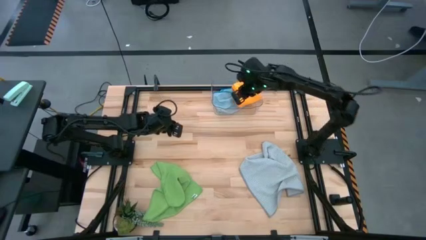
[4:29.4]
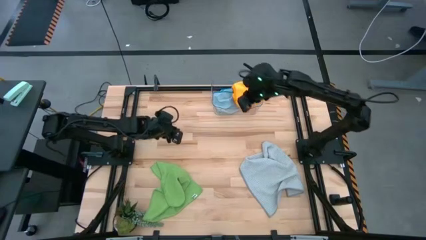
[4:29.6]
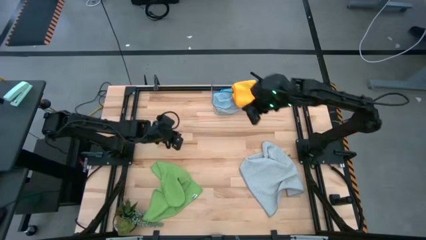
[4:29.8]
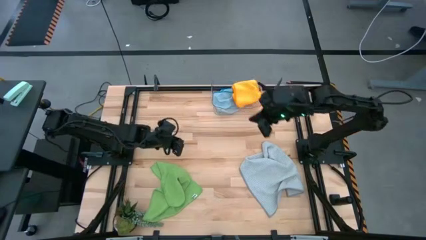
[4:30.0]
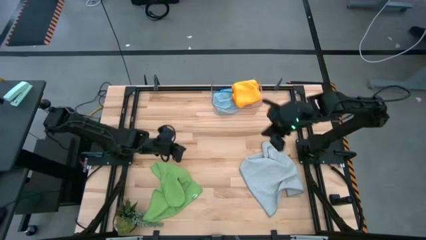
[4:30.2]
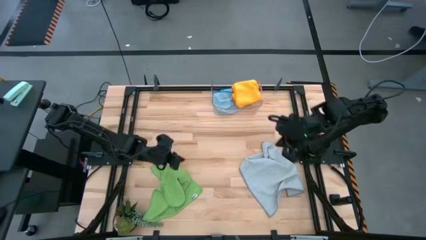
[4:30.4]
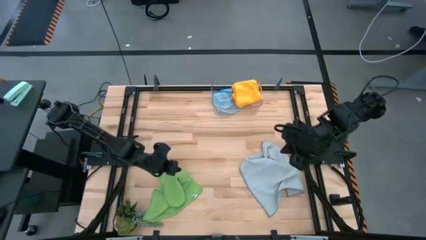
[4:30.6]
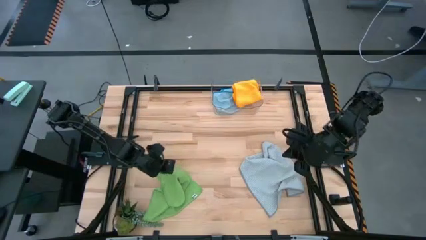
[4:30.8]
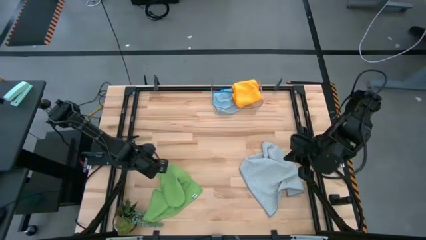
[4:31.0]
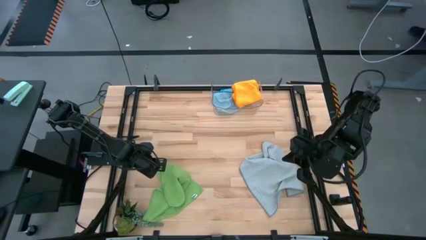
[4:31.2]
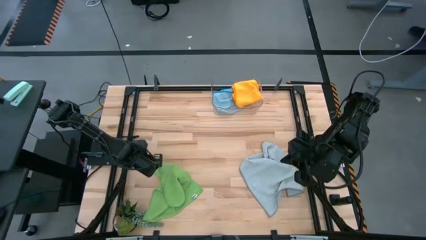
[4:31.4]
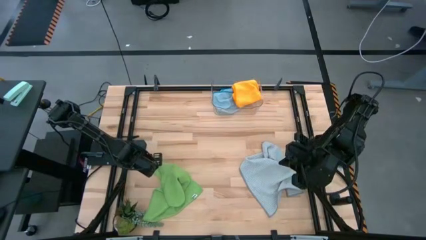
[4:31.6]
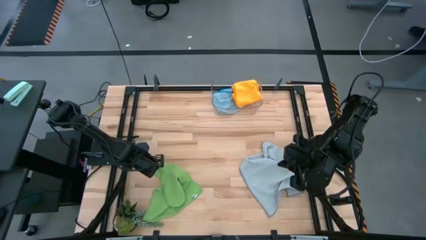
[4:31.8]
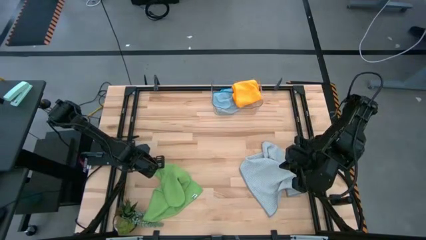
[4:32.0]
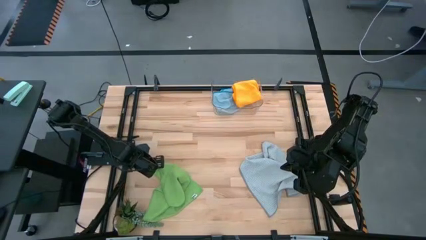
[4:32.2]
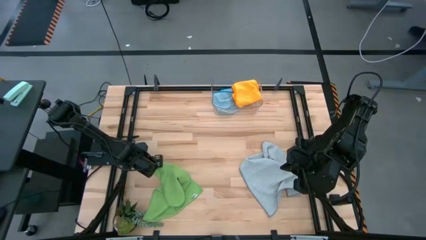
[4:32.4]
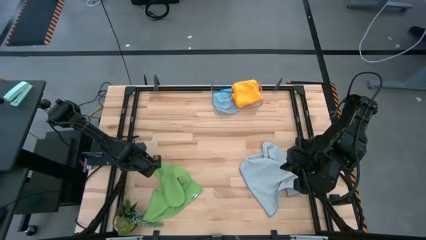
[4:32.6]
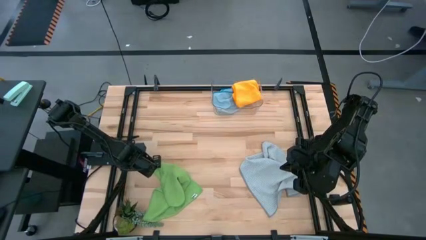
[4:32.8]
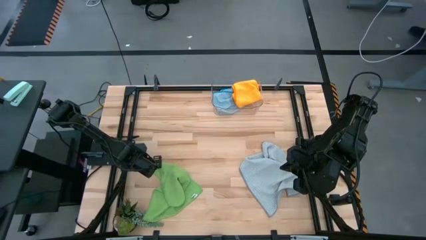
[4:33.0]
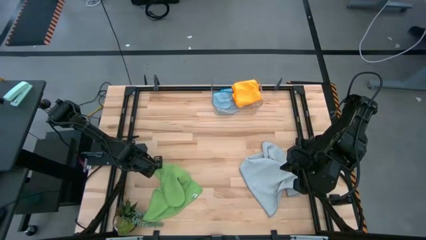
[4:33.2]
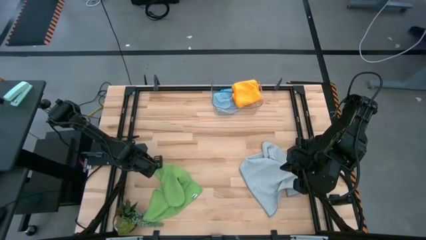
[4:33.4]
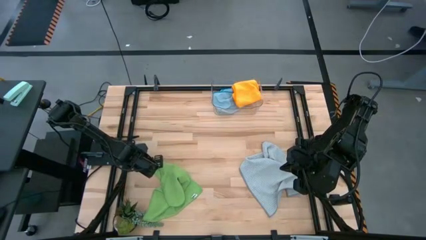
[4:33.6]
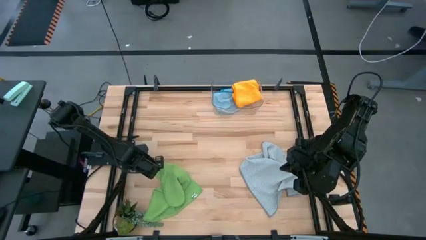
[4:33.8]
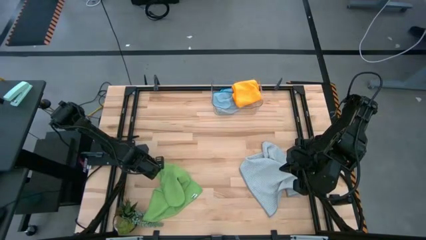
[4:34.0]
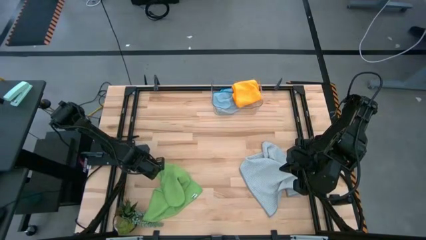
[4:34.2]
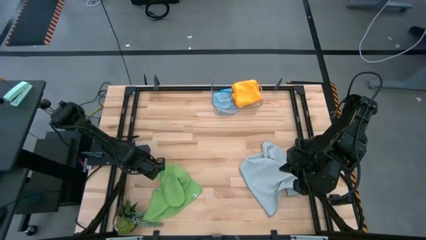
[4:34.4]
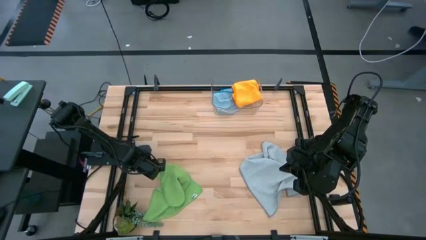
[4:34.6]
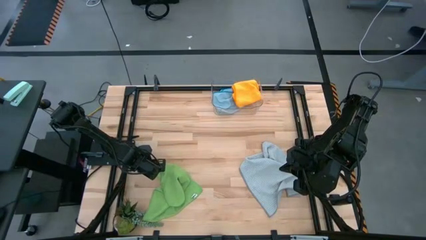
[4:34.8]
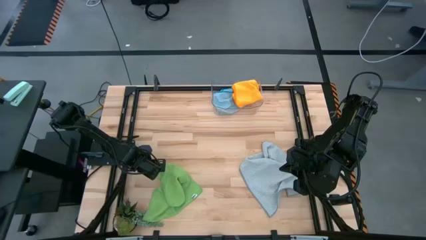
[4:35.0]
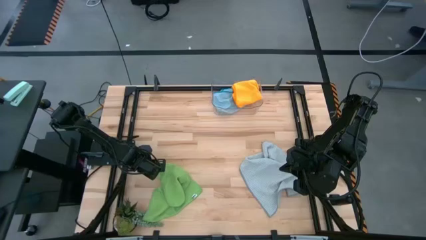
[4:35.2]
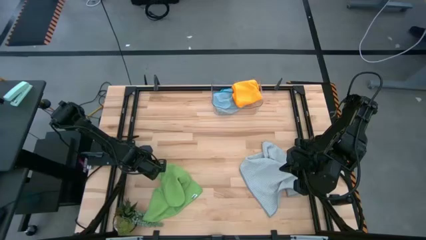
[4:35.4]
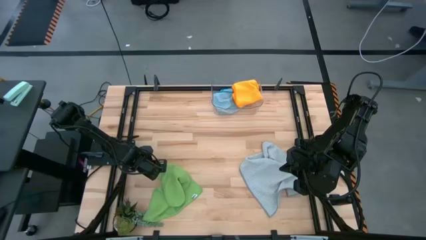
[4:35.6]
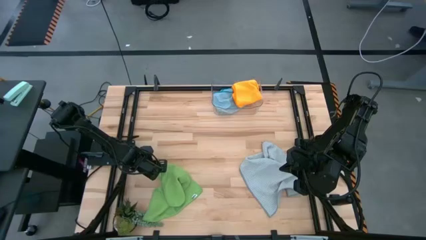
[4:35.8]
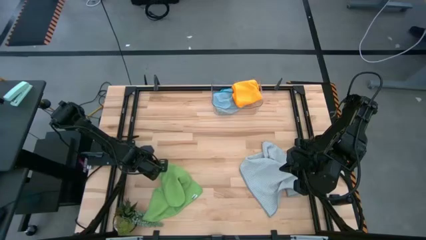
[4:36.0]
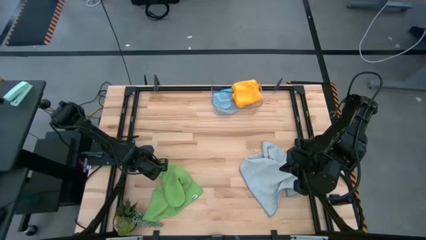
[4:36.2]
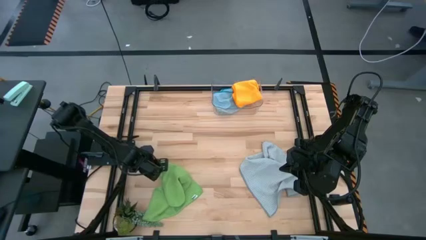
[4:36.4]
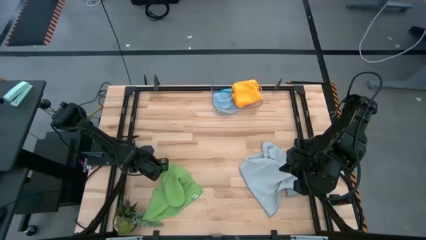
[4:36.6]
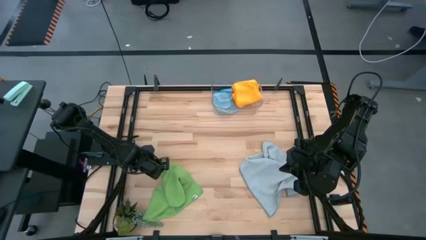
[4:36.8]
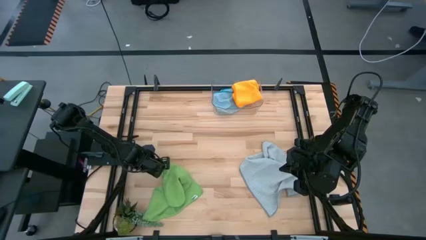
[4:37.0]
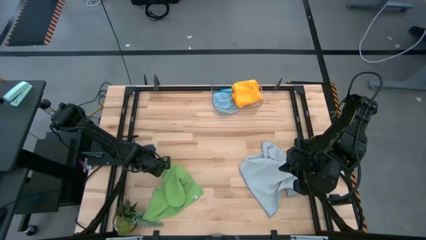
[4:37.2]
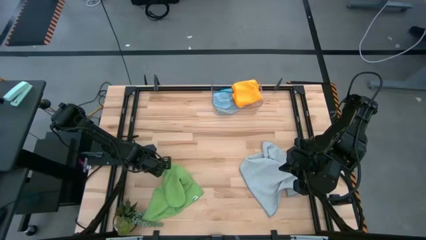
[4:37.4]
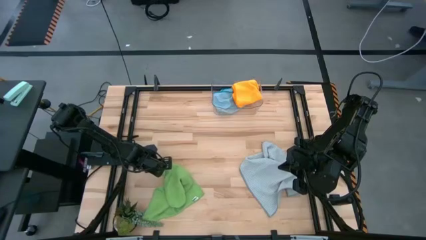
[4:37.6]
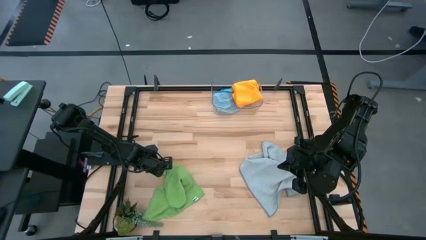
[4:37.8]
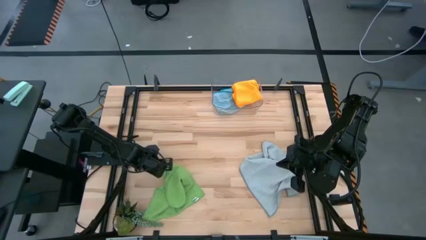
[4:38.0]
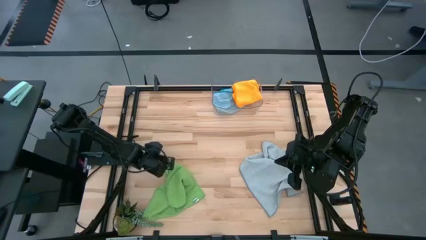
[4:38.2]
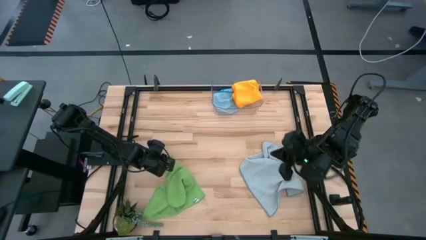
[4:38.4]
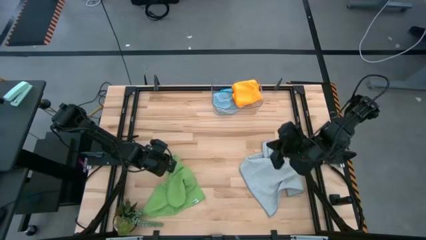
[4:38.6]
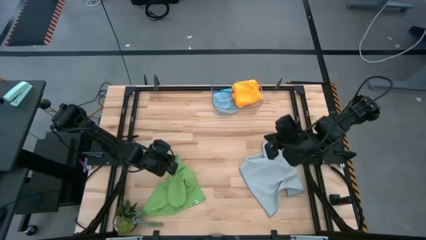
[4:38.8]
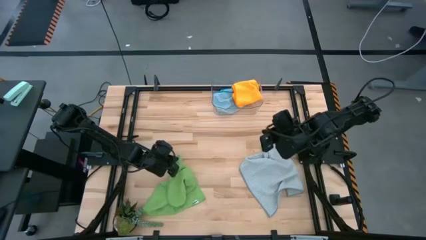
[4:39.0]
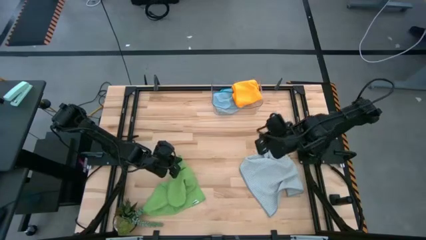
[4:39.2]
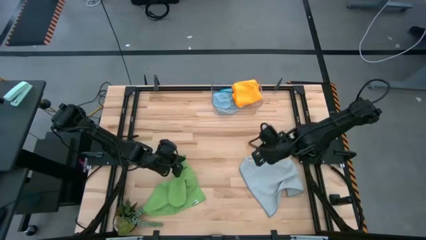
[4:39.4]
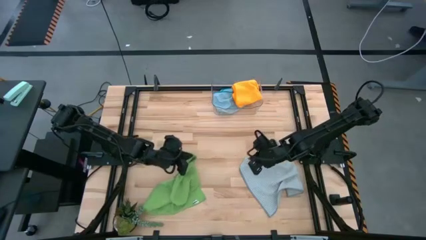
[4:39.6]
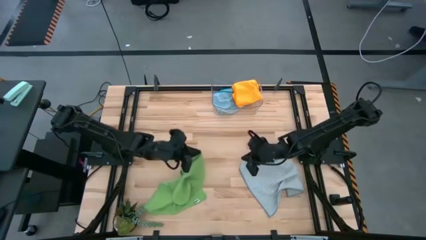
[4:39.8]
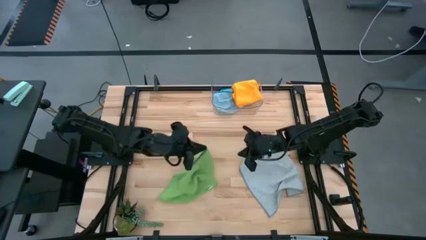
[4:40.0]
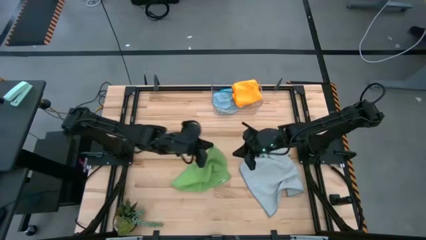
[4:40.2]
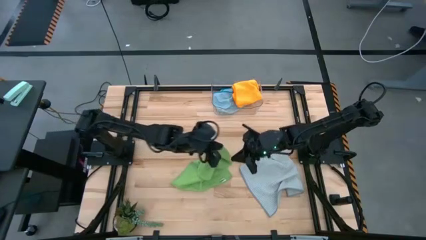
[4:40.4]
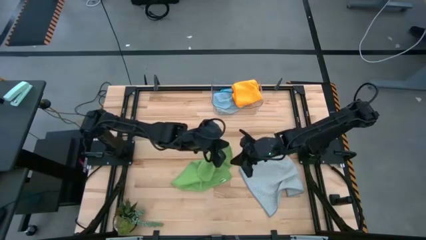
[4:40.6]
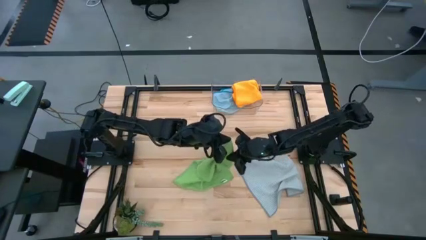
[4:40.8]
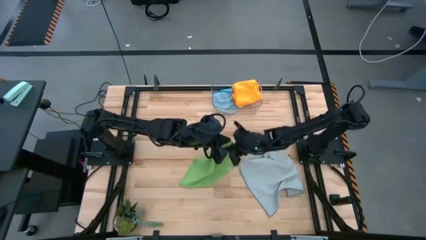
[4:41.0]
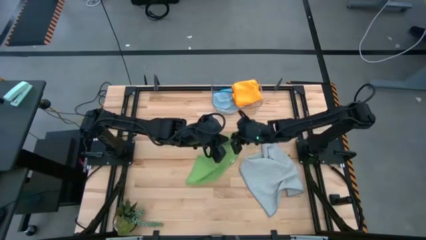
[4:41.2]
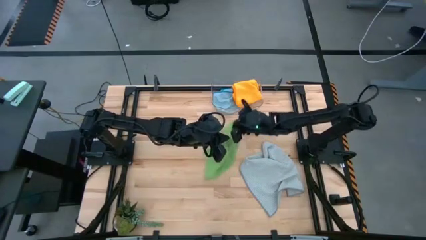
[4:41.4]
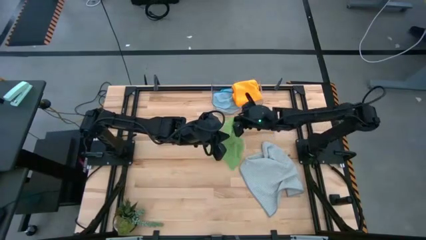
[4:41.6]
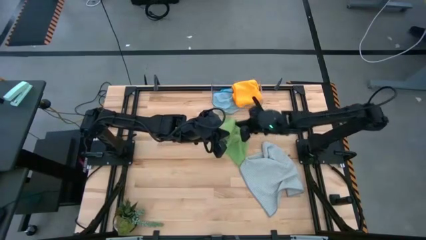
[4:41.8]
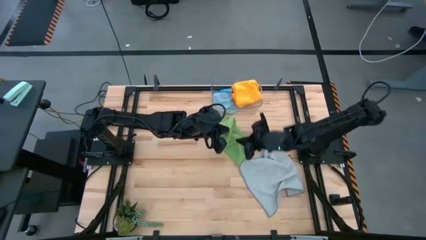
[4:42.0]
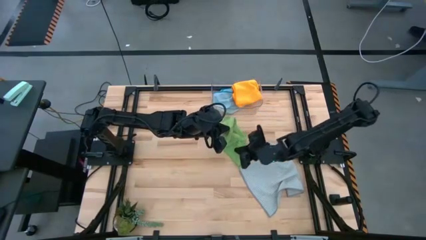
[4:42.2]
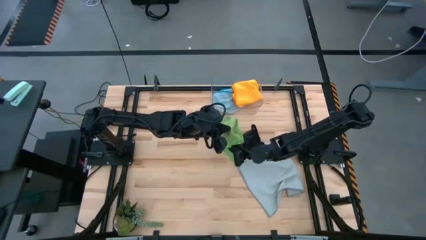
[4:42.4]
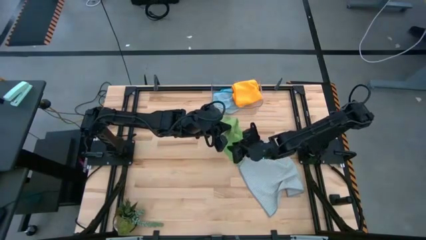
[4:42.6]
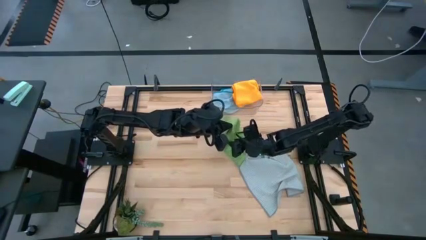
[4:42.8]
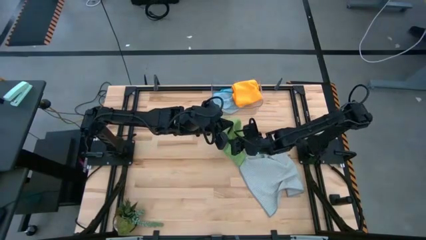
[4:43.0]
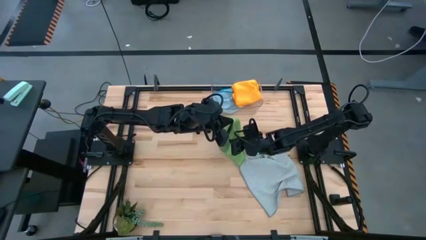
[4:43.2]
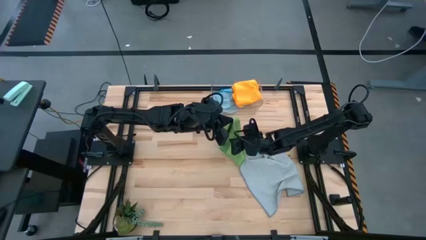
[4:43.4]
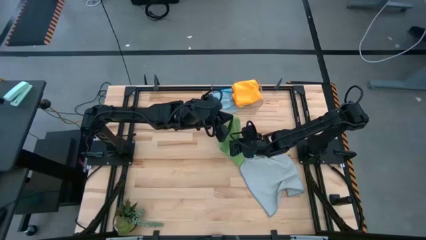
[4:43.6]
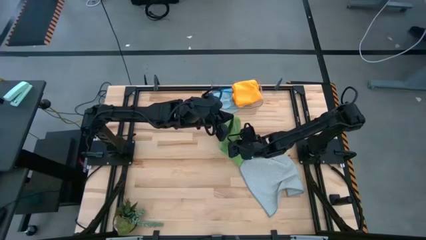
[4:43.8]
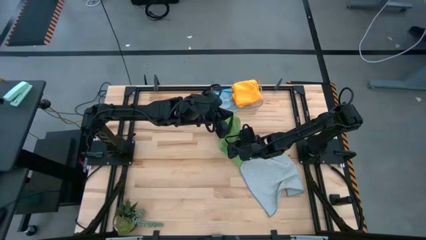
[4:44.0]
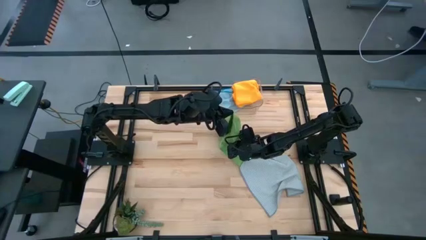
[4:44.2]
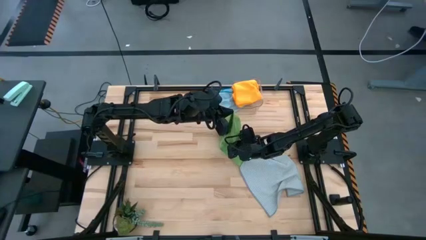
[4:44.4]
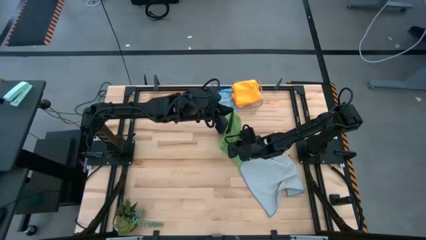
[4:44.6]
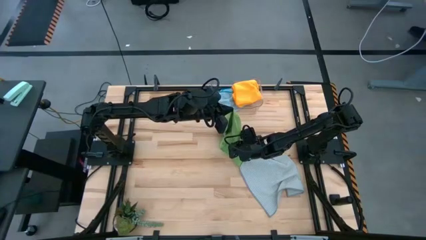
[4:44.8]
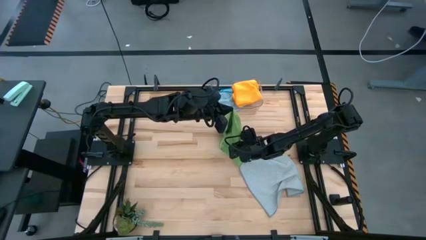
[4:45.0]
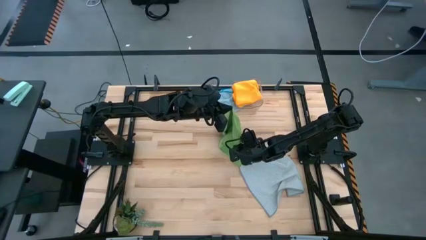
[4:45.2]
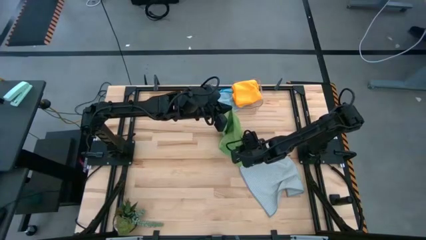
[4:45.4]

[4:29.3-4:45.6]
Task: Fold microfiber towels
Fold the green microfiber cloth
